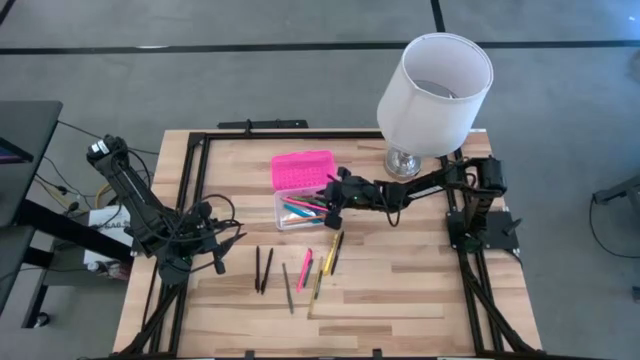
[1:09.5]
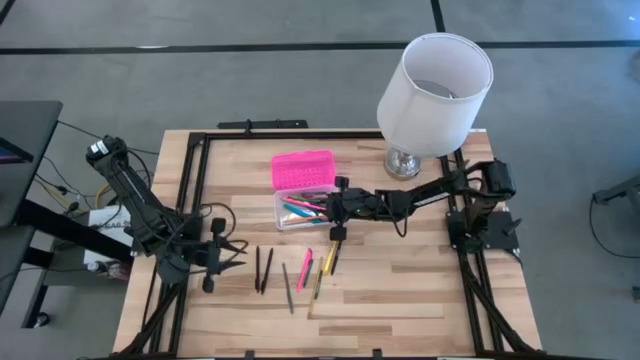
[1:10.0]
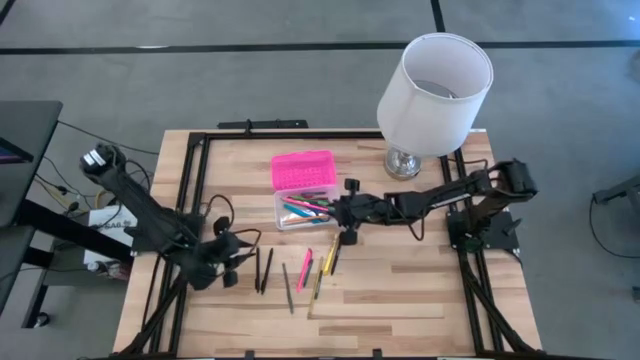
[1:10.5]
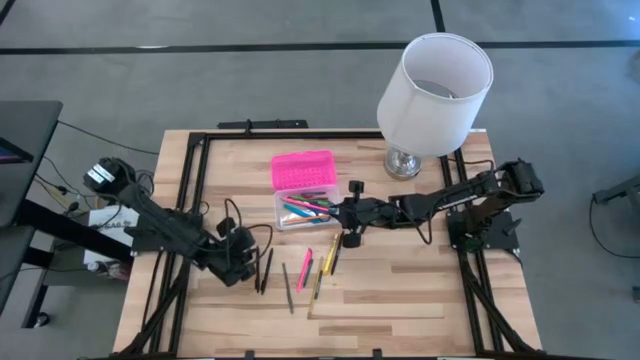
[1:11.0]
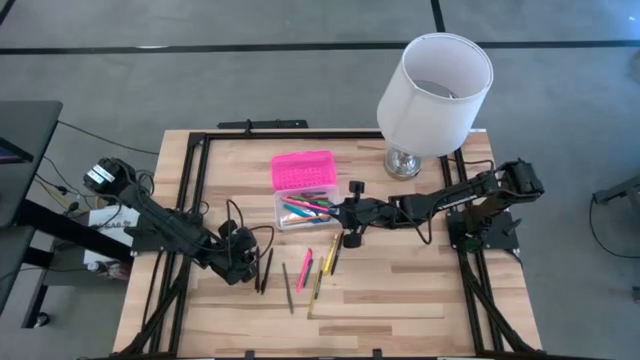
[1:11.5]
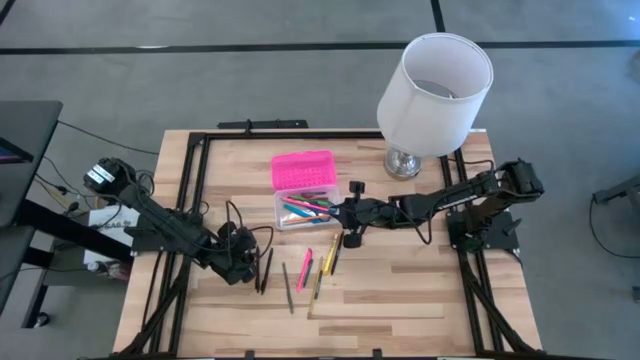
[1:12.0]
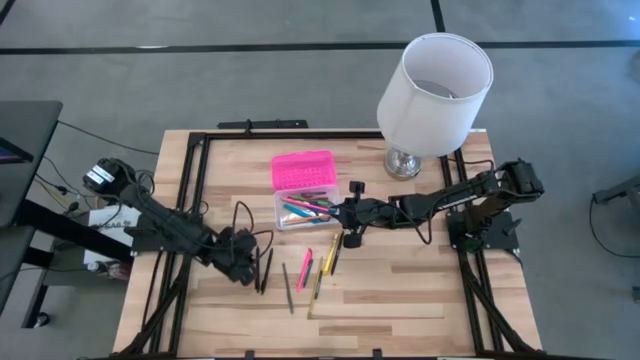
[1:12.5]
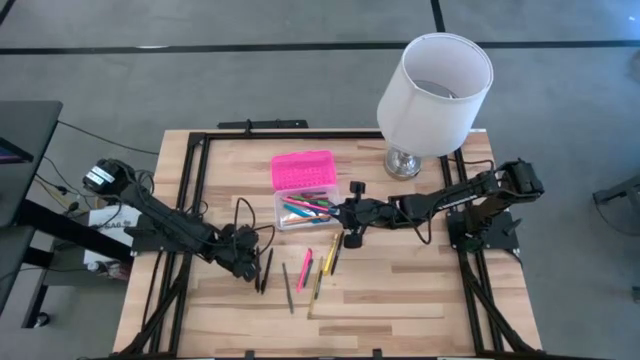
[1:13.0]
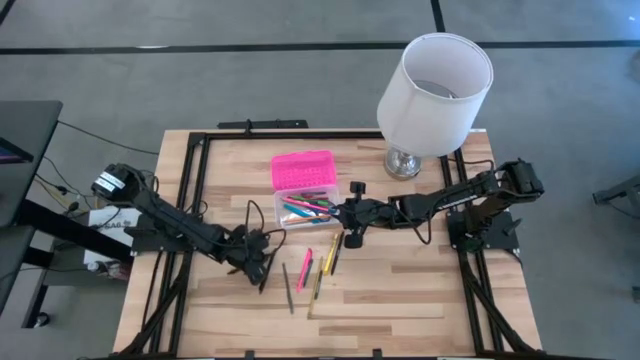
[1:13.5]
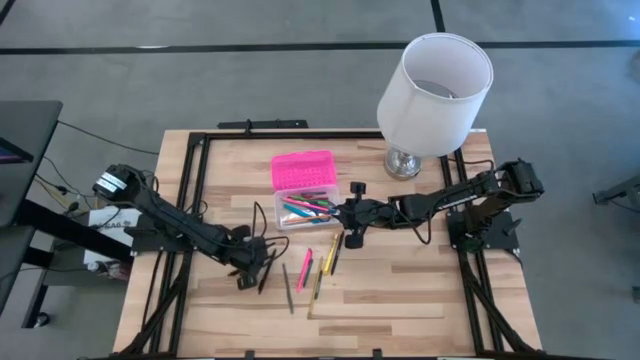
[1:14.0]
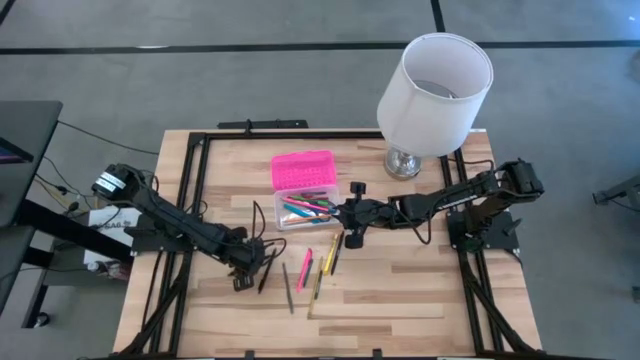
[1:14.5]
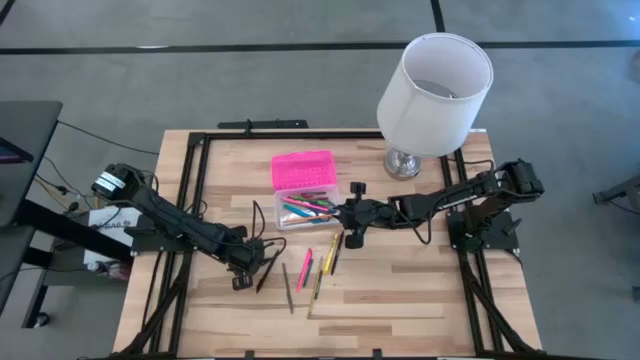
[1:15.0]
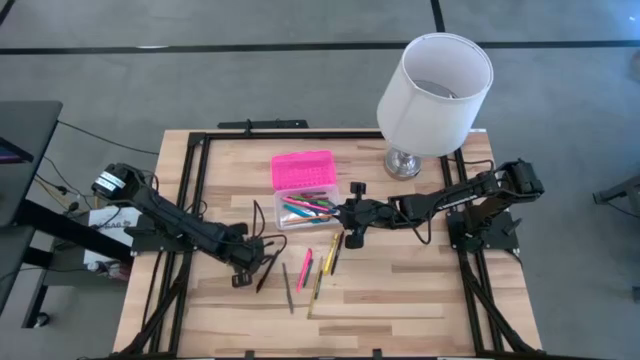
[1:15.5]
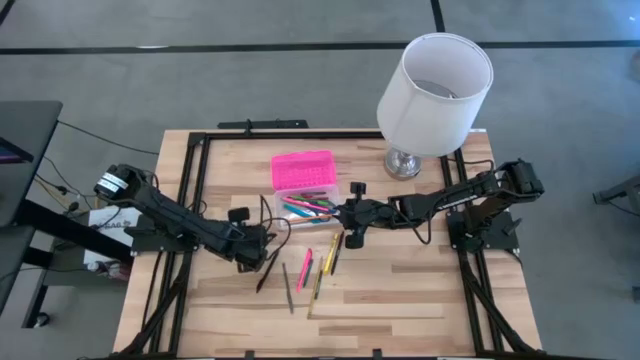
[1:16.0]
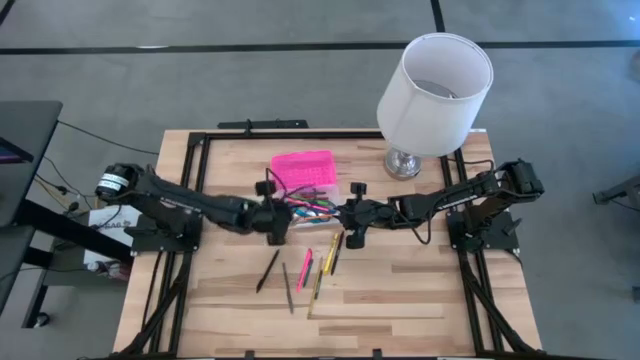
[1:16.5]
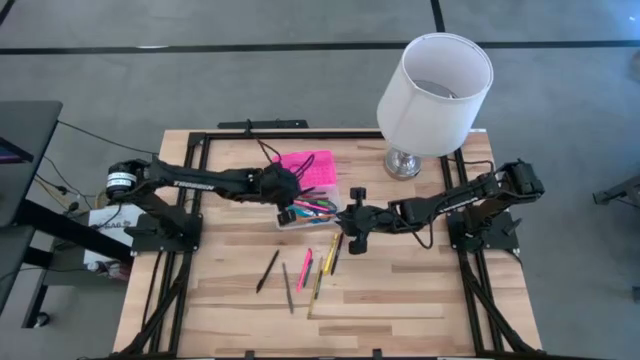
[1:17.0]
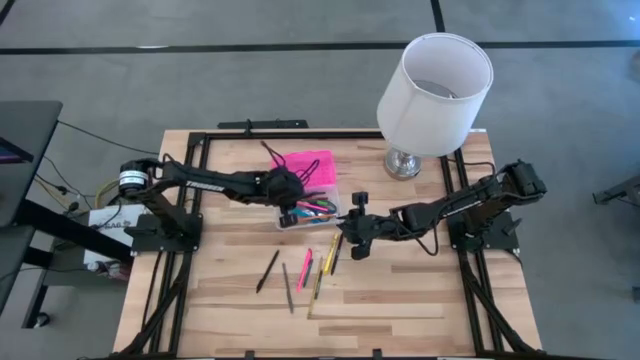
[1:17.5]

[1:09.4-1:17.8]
Task: Pick & place school supplies into a supply box
Put the left black pen into the pink supply box

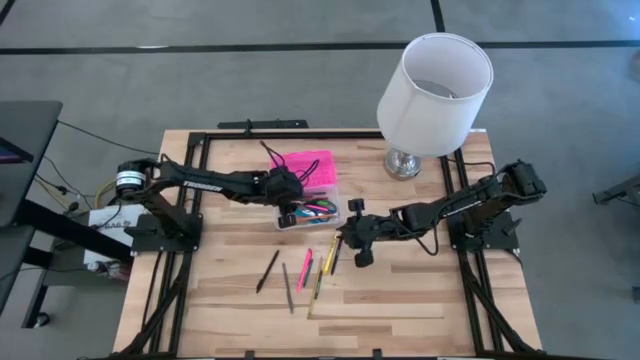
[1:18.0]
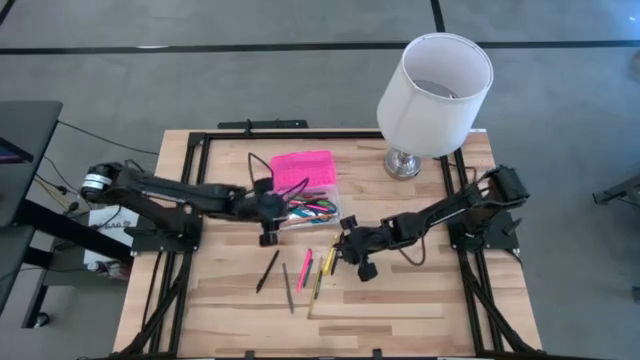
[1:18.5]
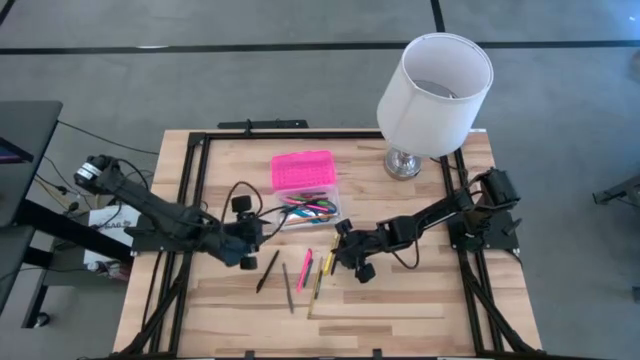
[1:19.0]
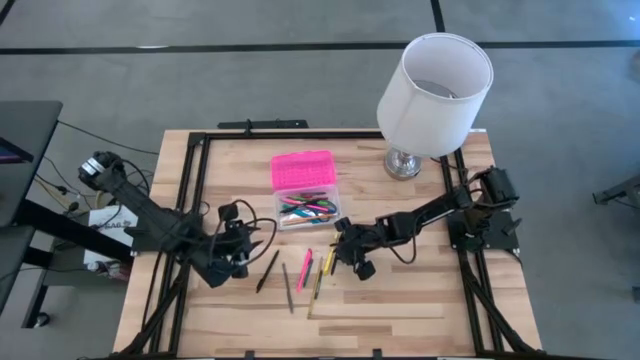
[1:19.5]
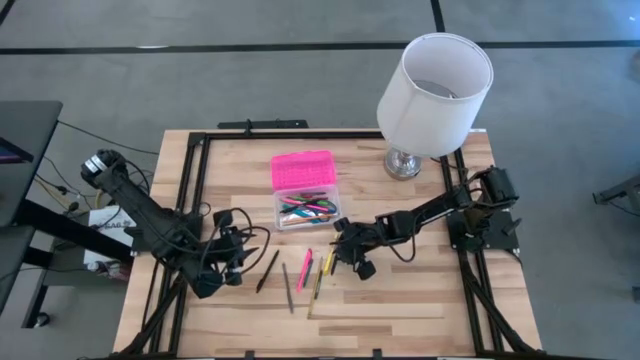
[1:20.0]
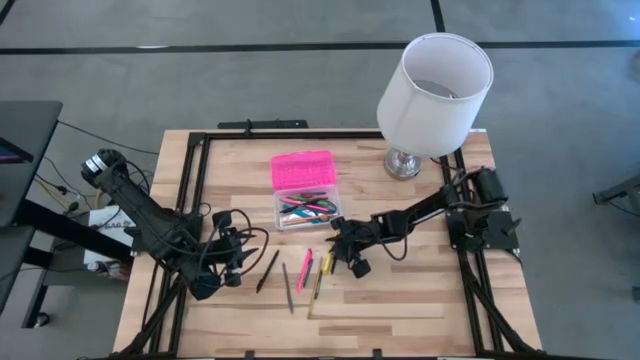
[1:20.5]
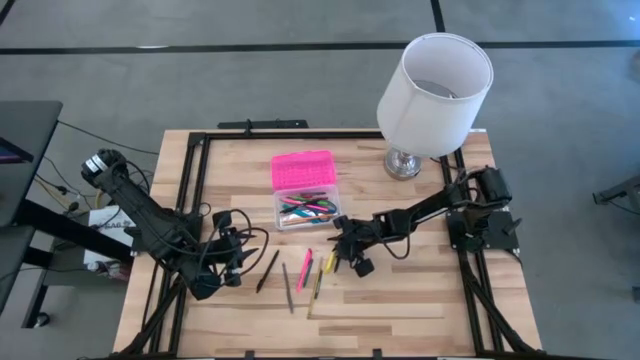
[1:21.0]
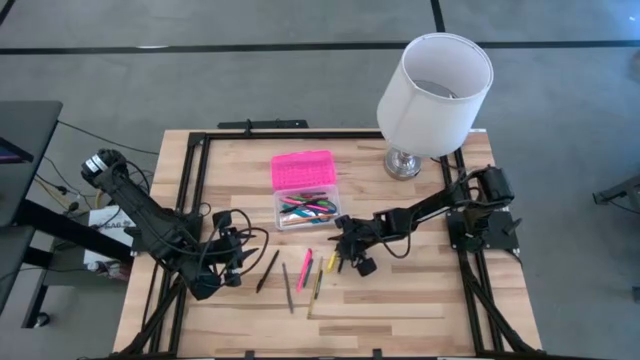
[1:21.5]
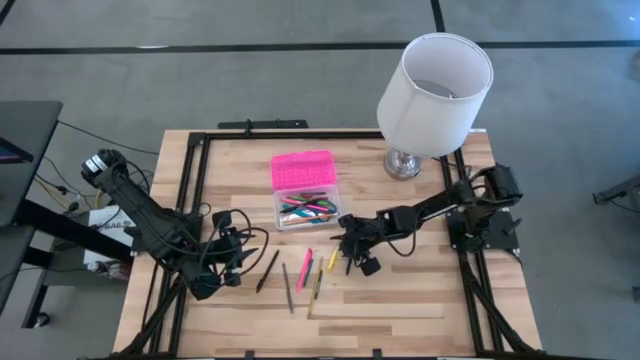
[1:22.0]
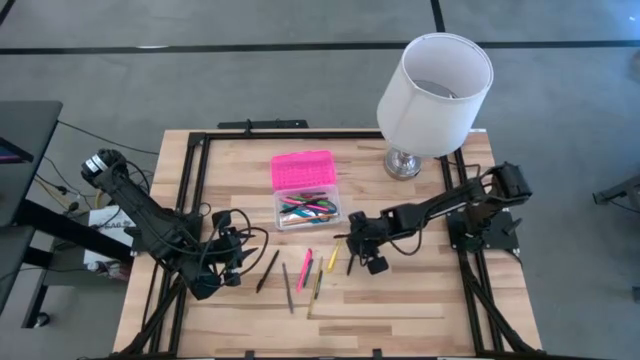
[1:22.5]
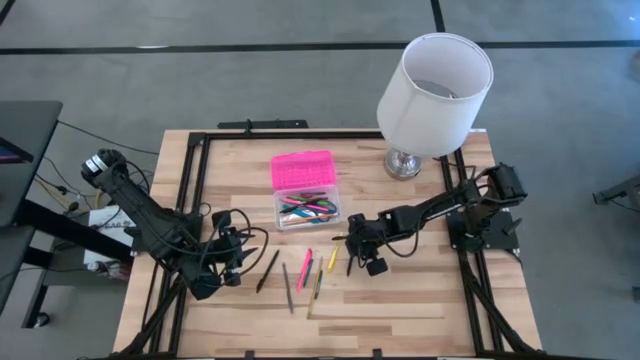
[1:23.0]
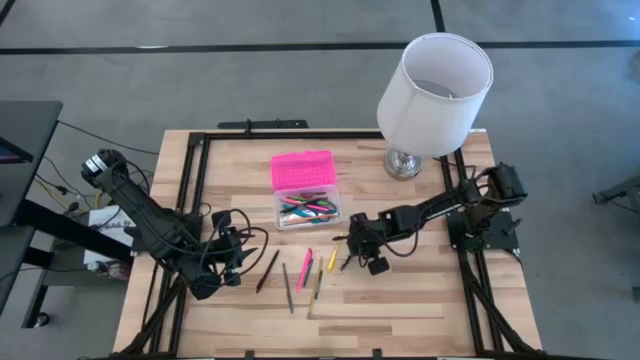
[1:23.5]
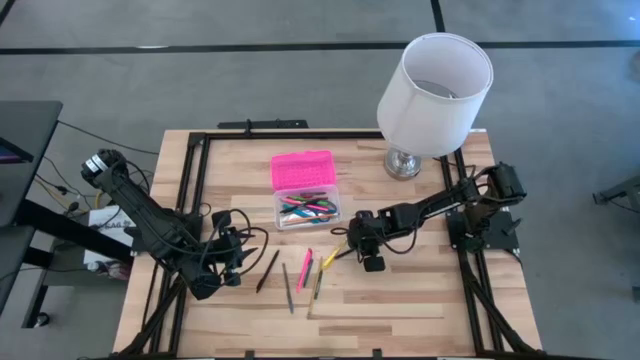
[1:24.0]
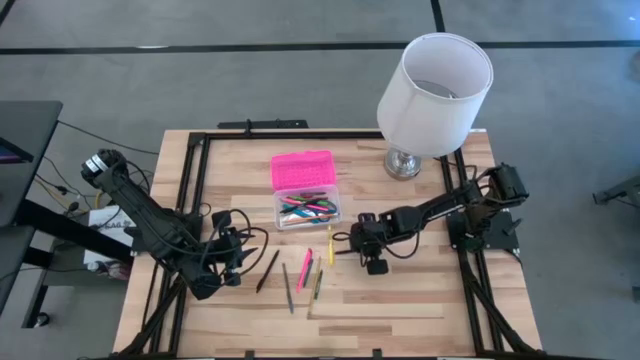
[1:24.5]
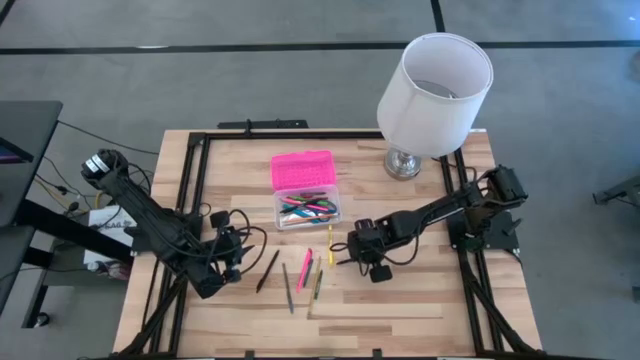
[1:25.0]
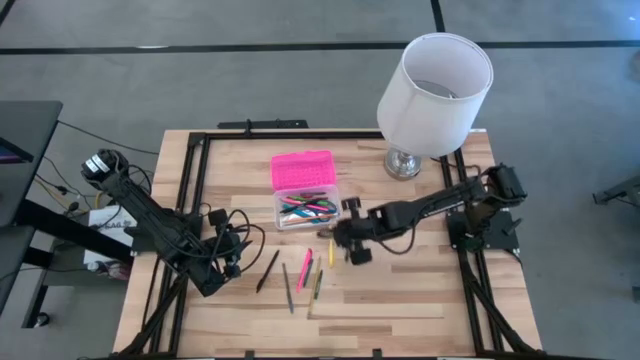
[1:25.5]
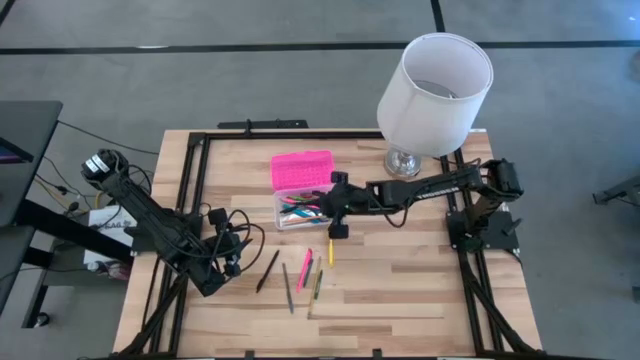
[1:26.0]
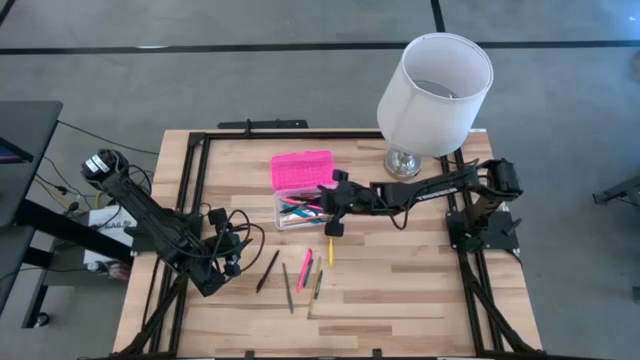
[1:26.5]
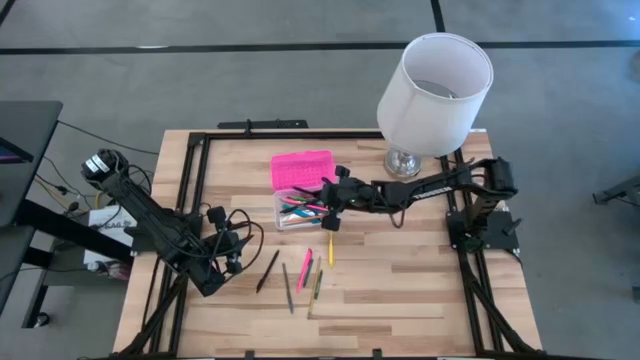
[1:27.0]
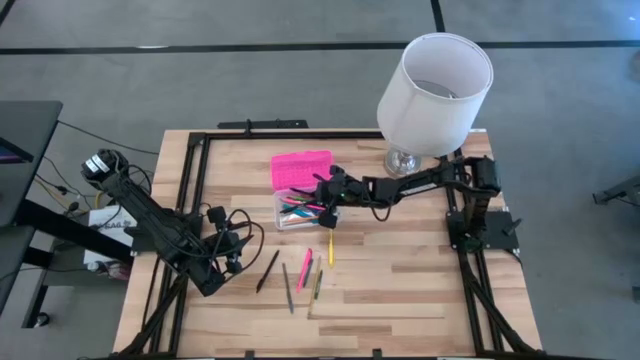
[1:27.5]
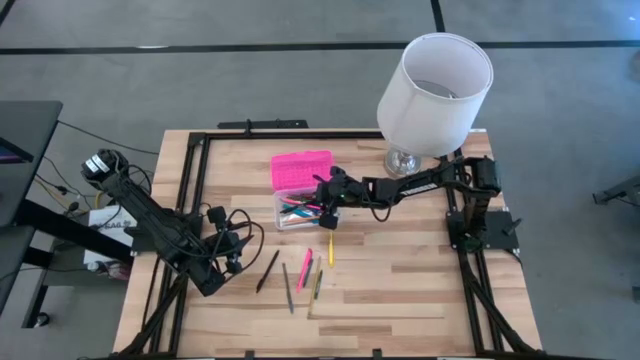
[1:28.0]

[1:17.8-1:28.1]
Put the right black pen into the pink supply box

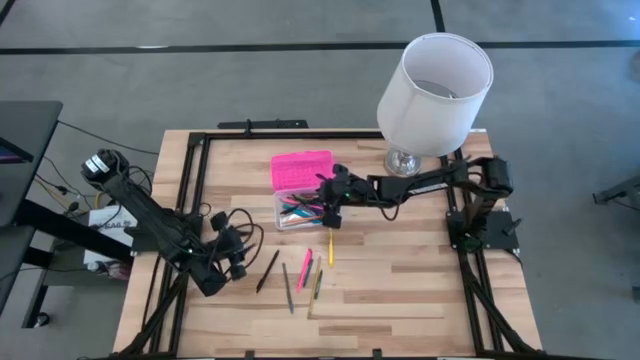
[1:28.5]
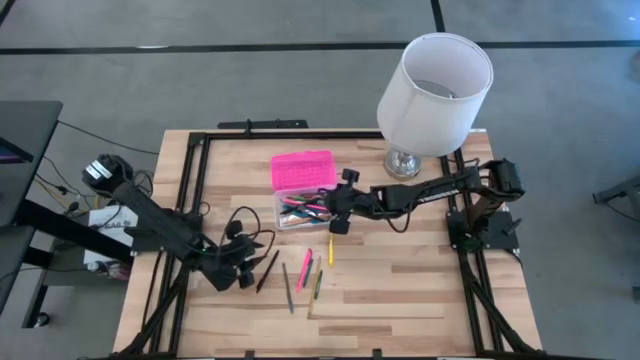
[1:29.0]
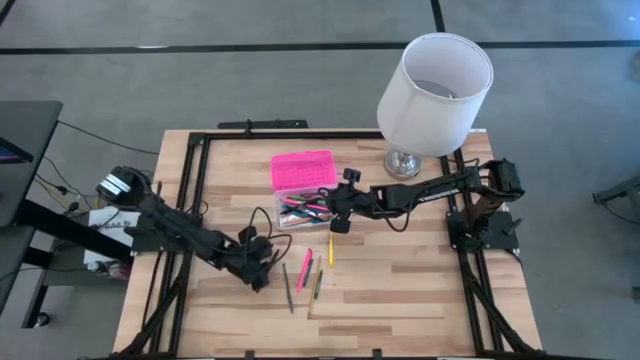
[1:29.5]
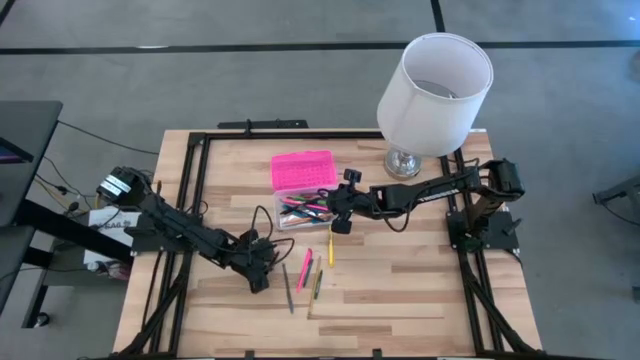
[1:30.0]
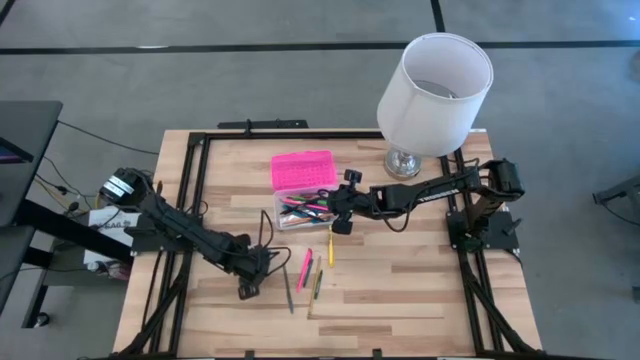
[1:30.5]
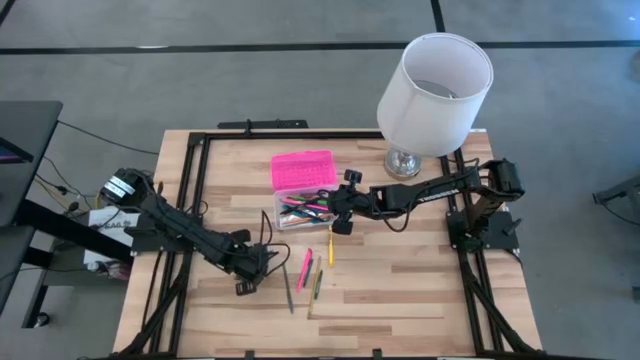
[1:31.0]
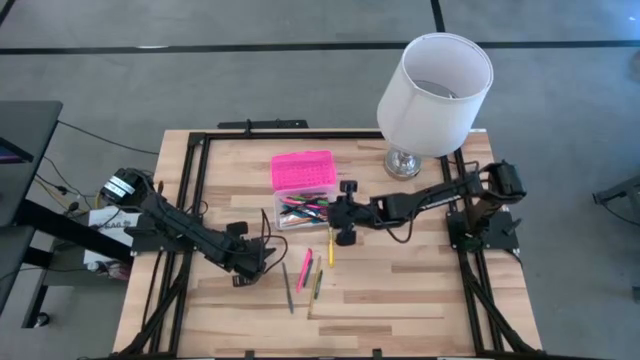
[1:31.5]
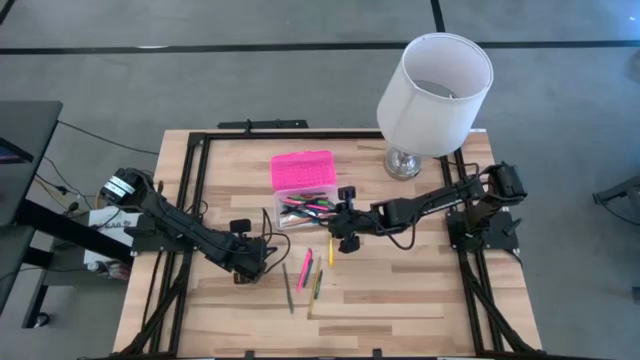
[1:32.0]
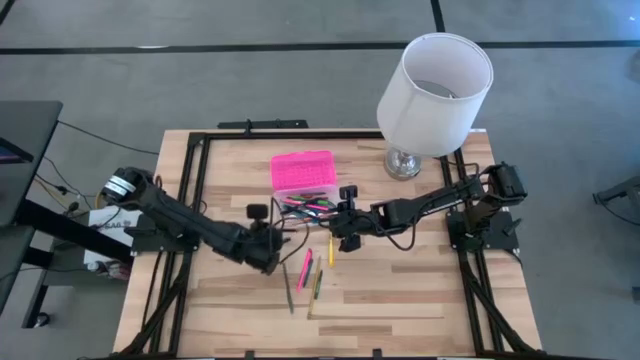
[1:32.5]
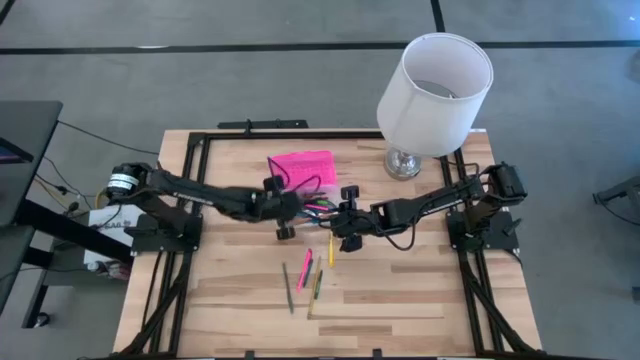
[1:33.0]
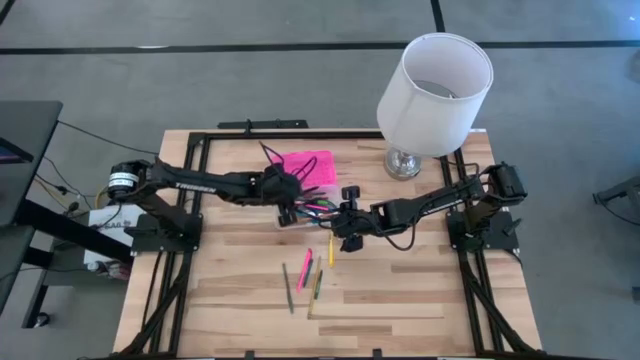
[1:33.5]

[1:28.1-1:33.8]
Put the black pen into the pink supply box
